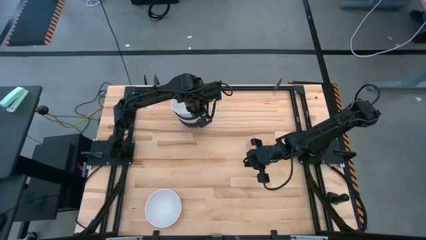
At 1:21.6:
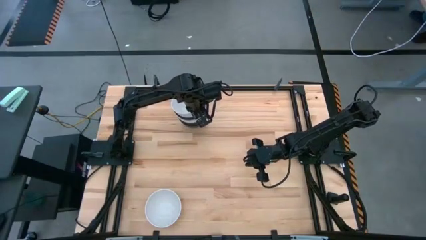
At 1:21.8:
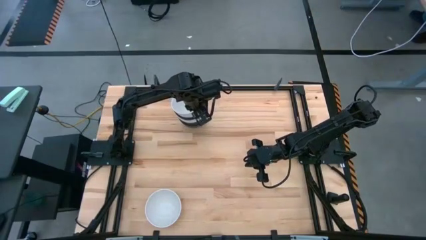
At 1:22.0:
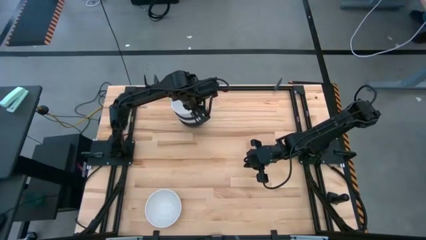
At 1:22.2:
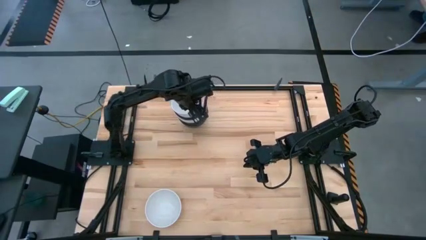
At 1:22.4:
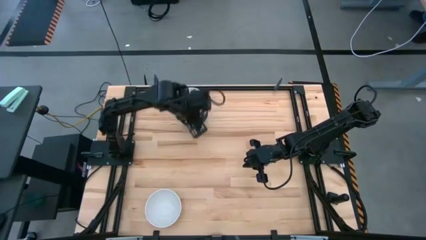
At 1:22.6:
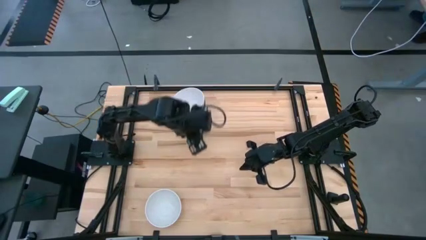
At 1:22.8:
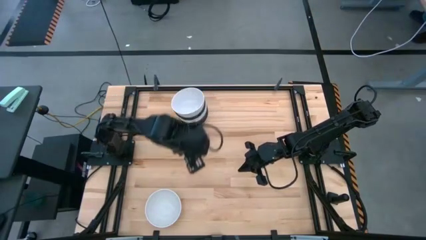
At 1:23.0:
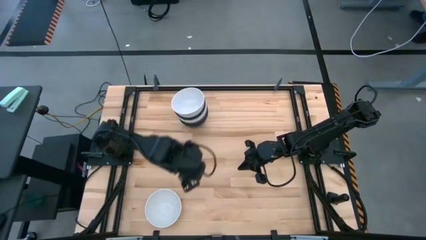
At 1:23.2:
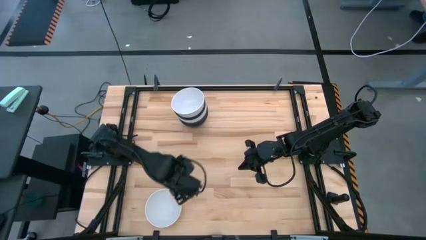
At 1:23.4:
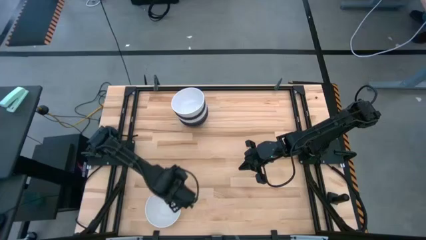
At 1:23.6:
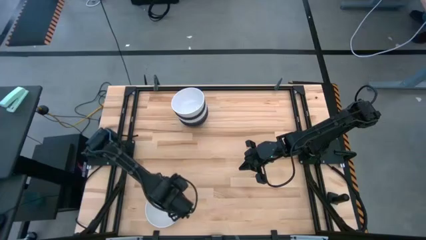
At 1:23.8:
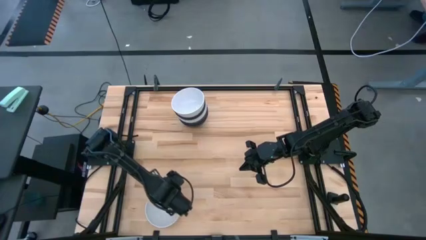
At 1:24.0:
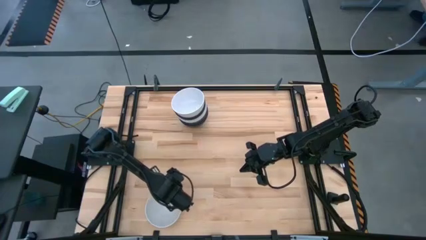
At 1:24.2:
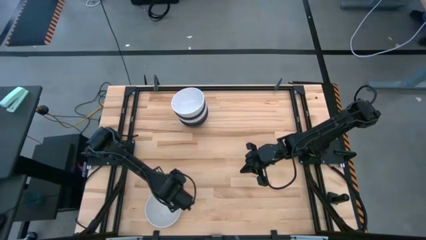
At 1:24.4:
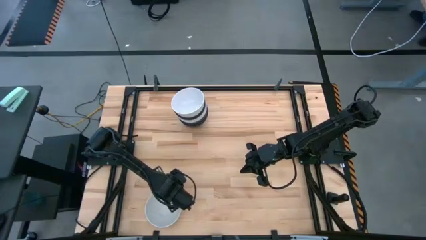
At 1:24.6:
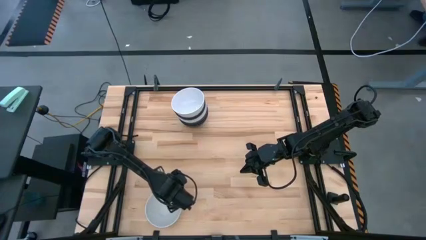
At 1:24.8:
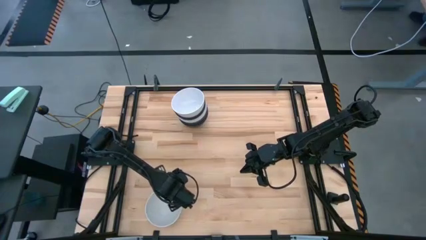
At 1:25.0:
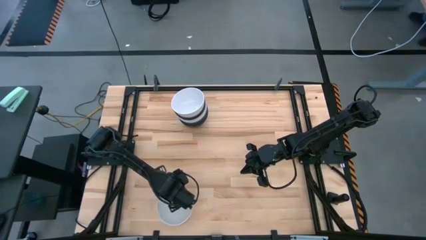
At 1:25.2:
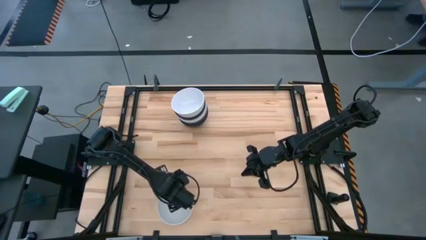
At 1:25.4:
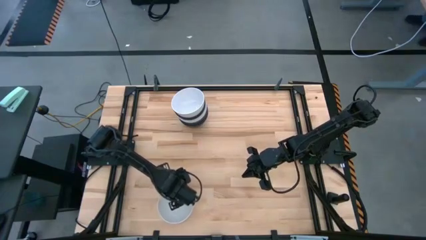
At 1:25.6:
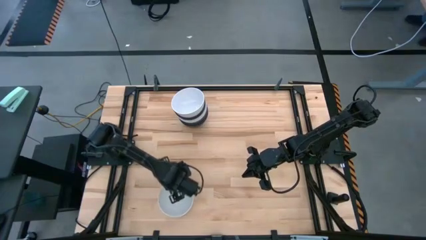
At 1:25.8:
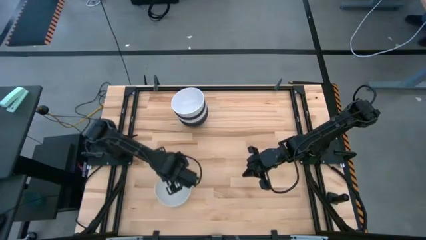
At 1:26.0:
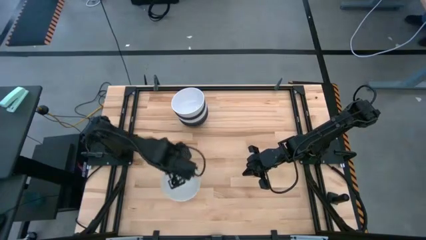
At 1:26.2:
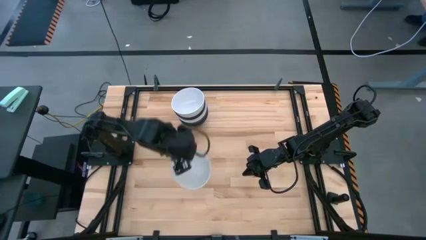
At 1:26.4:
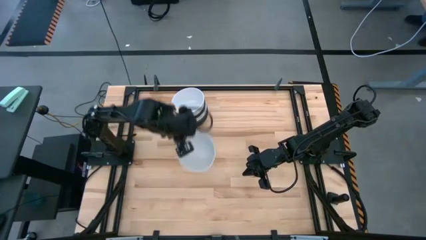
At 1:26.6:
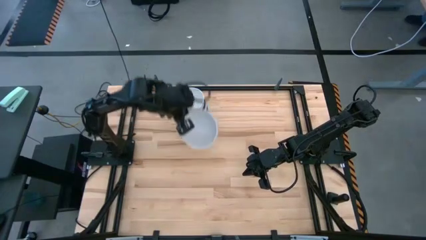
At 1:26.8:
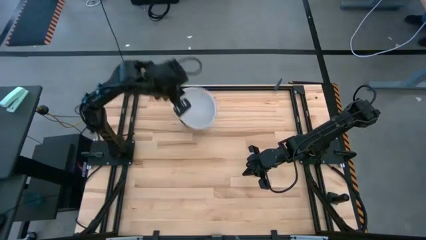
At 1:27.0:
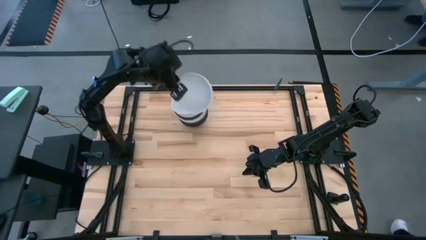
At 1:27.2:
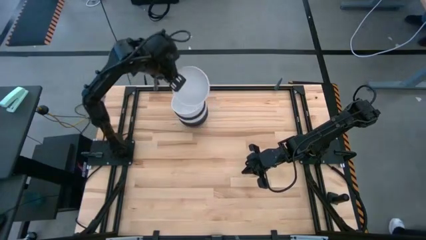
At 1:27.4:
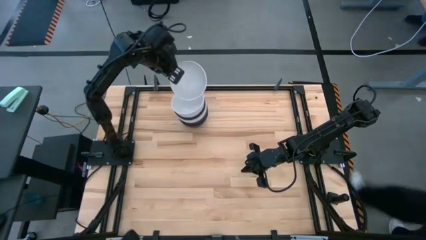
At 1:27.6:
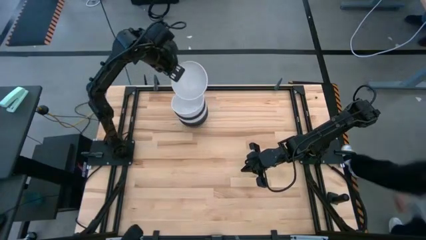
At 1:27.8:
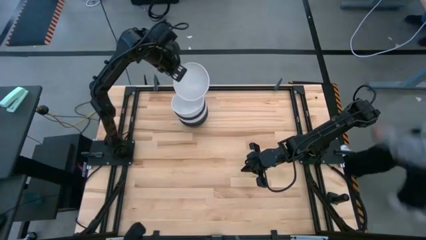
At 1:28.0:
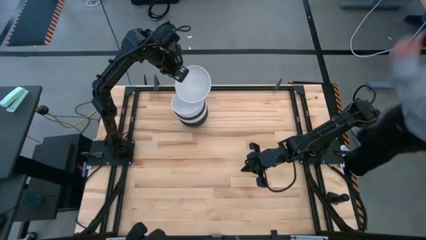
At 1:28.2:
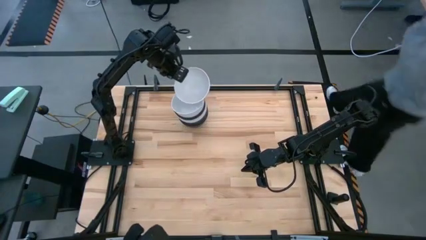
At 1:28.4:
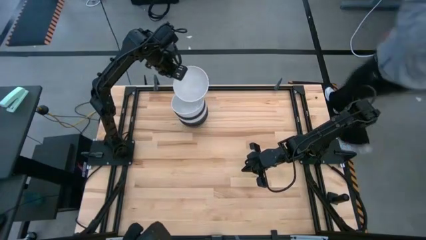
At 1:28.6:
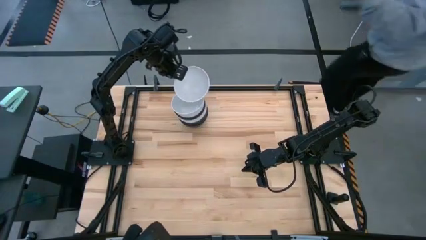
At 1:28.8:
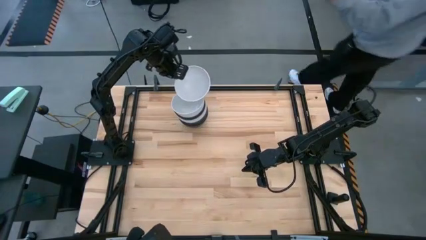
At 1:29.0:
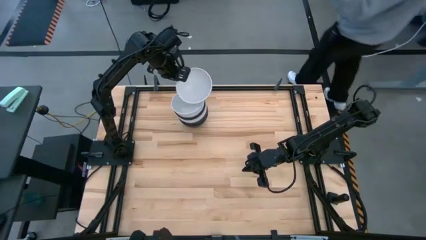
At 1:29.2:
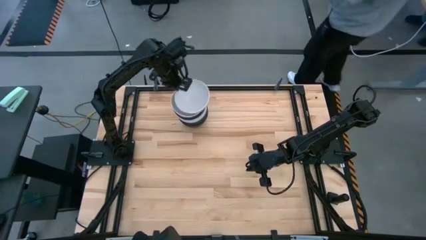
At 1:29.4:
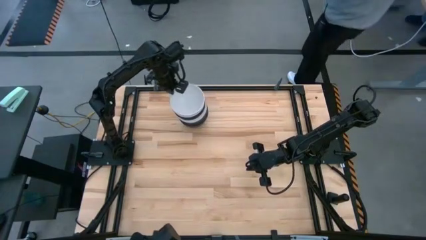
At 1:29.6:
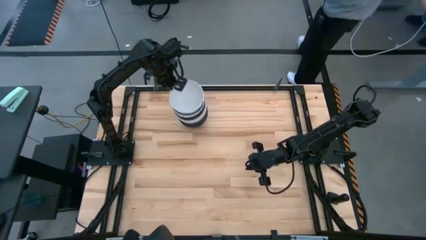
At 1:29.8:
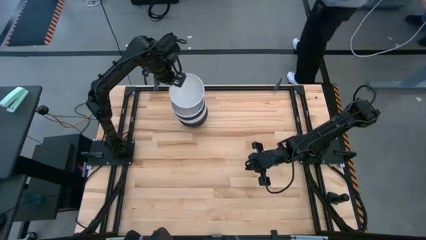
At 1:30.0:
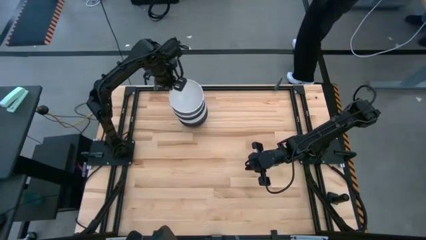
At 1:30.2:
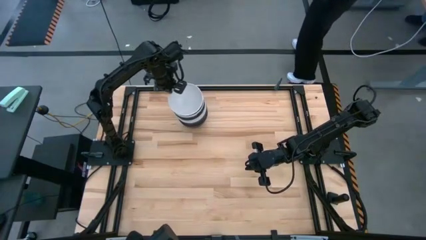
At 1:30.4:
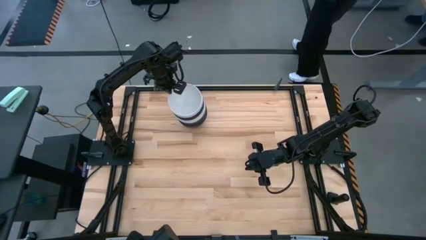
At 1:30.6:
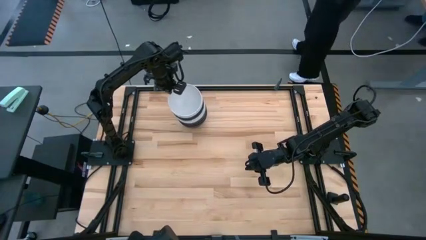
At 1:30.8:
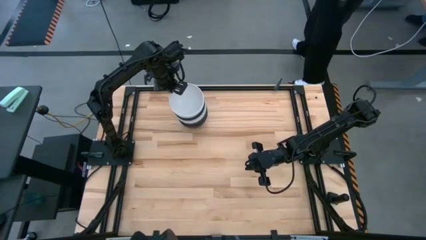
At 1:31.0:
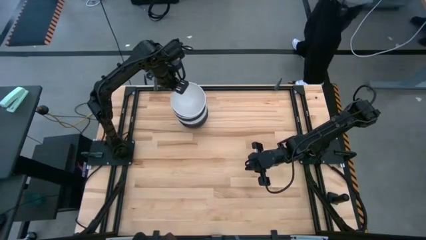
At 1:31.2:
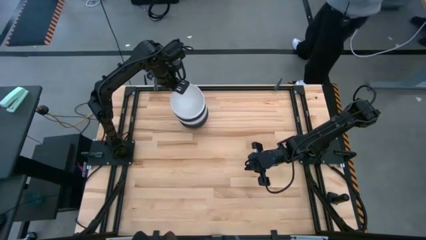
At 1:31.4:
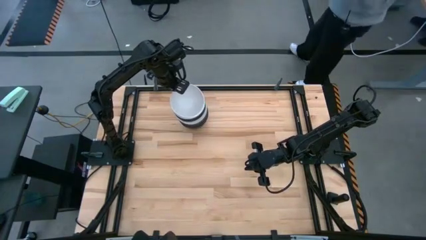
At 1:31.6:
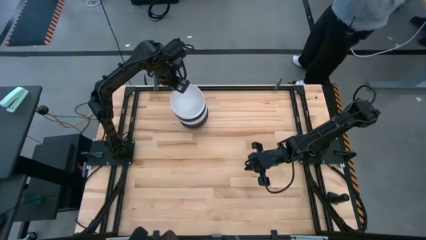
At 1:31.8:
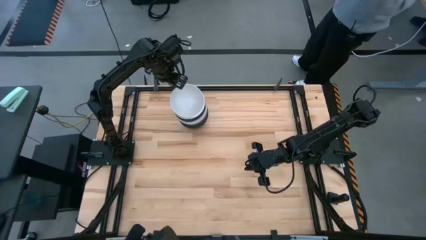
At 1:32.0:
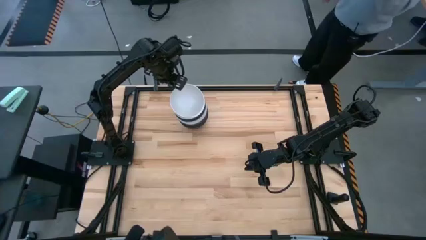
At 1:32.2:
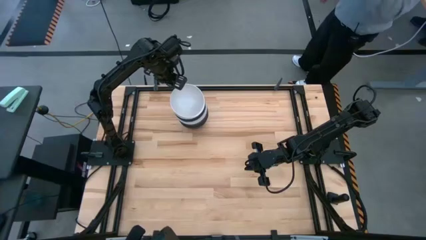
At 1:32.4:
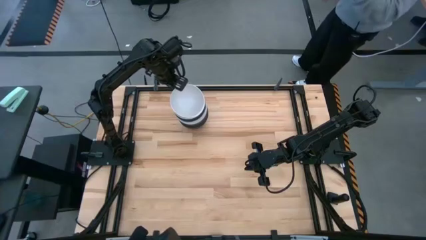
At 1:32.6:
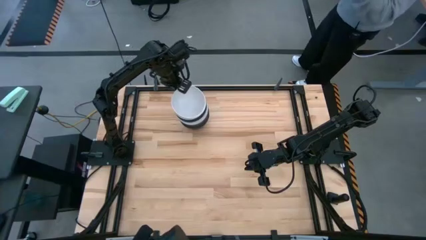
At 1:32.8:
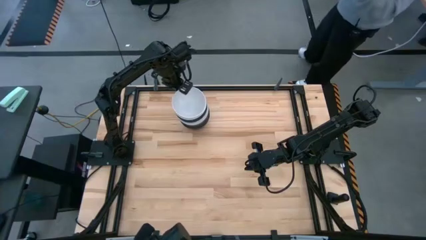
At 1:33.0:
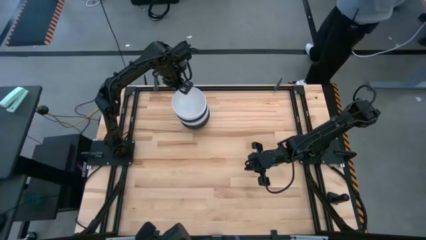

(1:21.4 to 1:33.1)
Task: Nest bowls inside each other
Stack the white bowl on top of the stacked white bowl

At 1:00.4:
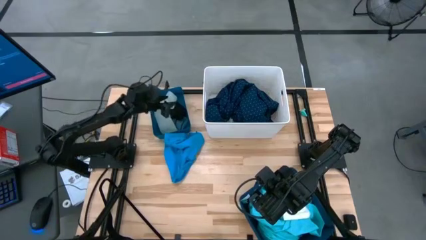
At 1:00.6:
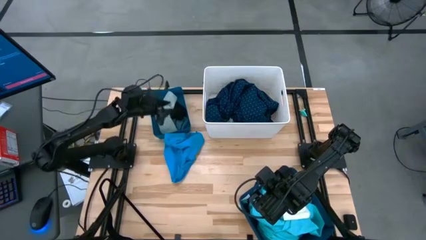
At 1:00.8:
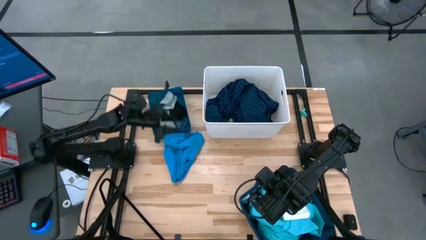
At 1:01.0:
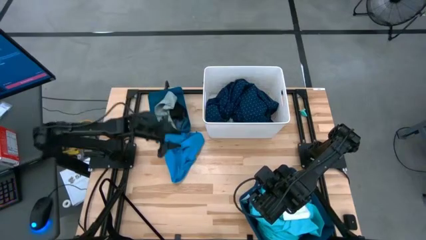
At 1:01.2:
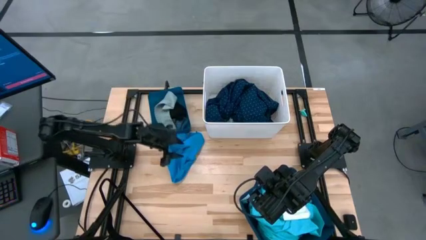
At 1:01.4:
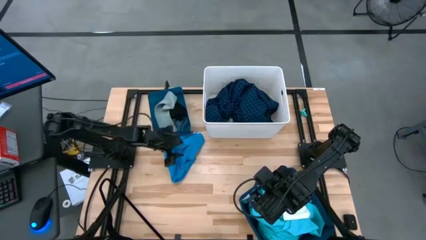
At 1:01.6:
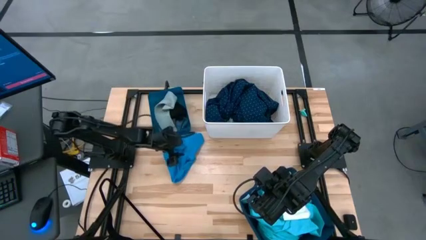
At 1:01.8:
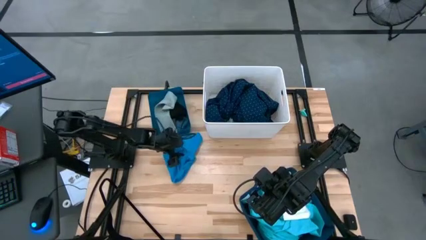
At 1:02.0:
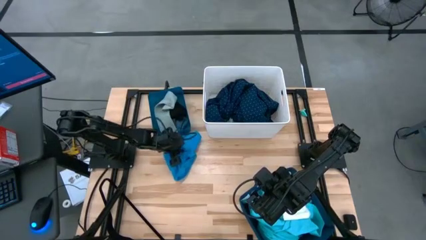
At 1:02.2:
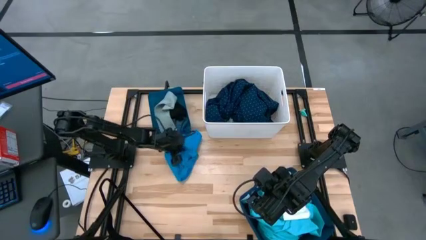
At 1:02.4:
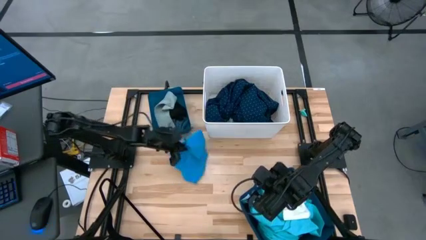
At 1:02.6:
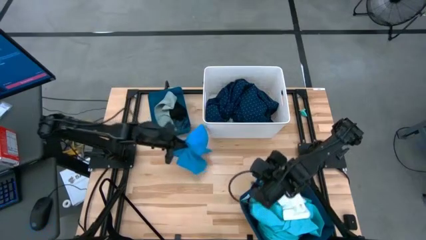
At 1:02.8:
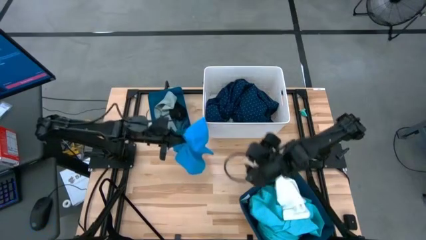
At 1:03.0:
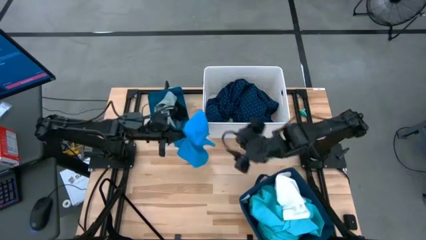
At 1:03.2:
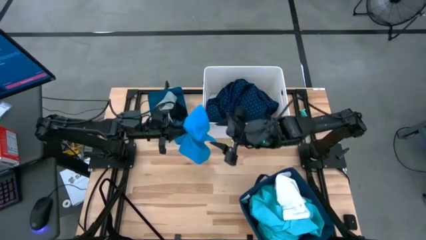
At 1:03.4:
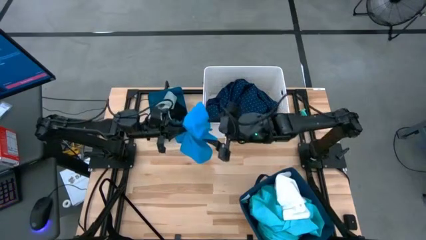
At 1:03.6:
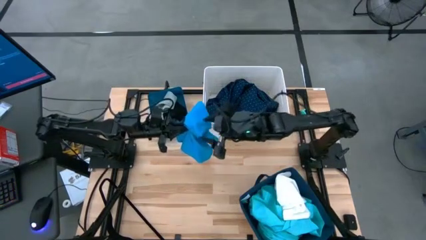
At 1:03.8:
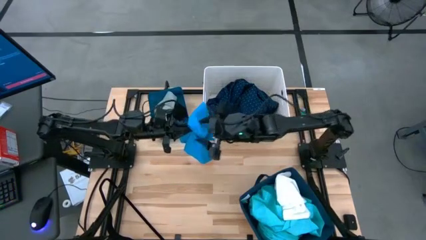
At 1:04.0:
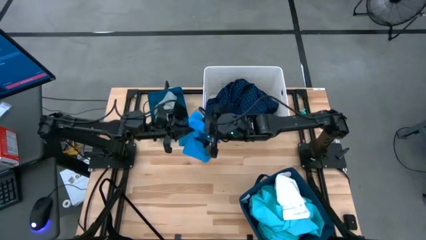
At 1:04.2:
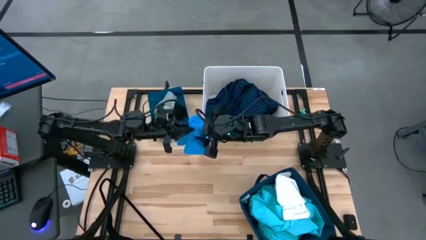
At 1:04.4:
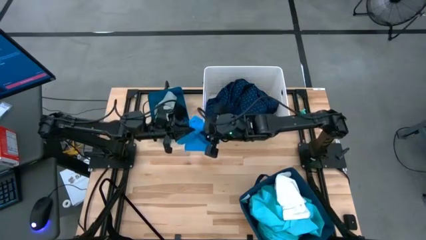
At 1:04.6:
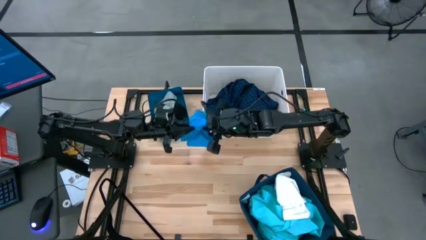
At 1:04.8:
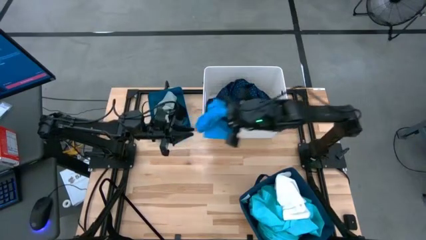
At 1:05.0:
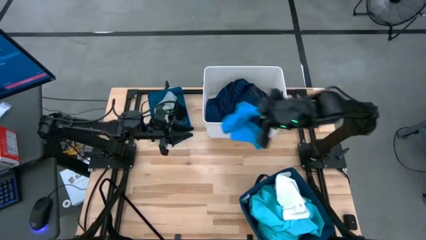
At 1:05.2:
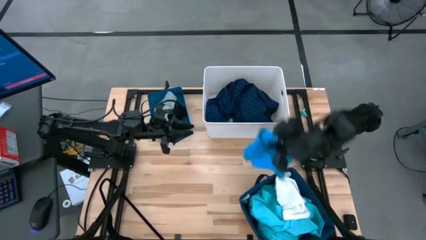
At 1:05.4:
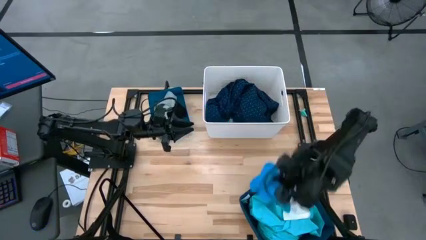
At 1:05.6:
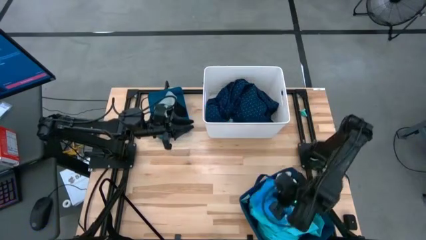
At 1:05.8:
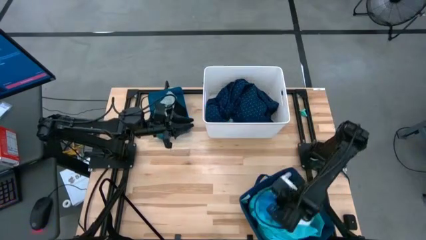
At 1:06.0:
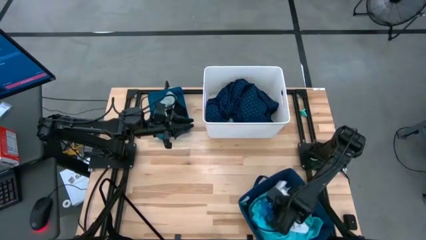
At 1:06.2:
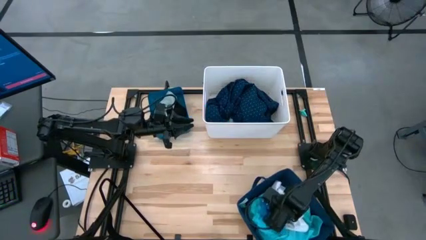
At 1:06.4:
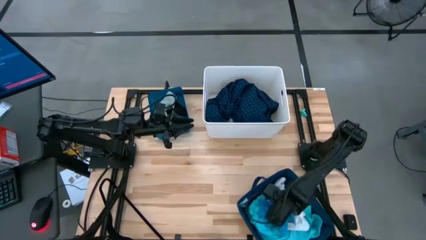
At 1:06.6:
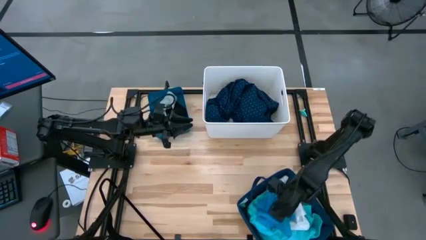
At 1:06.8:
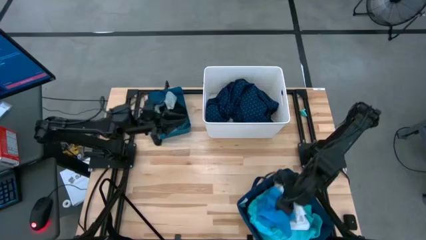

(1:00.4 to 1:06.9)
Task: Pick & Place Cloths
Put the blue shorts into the dark blue bin
